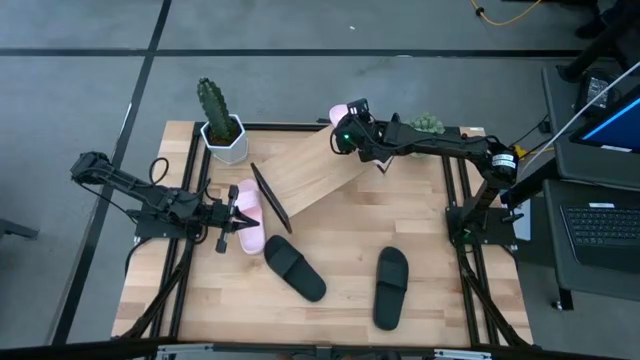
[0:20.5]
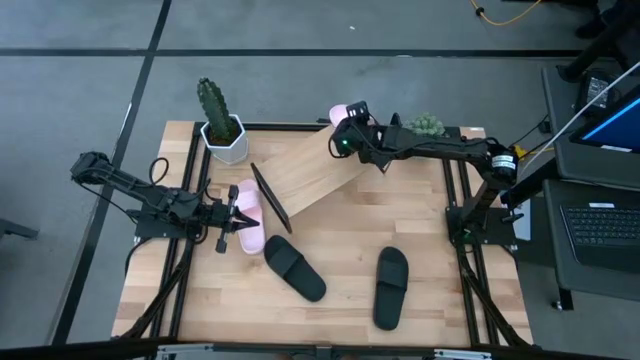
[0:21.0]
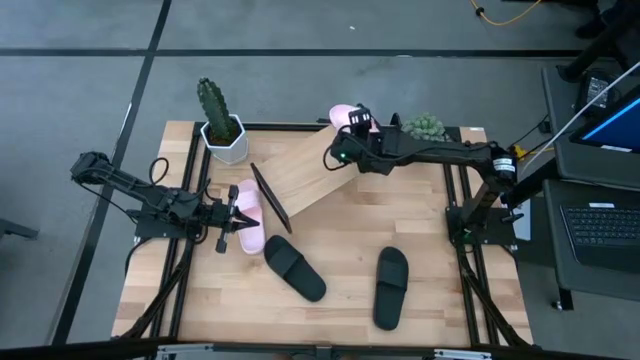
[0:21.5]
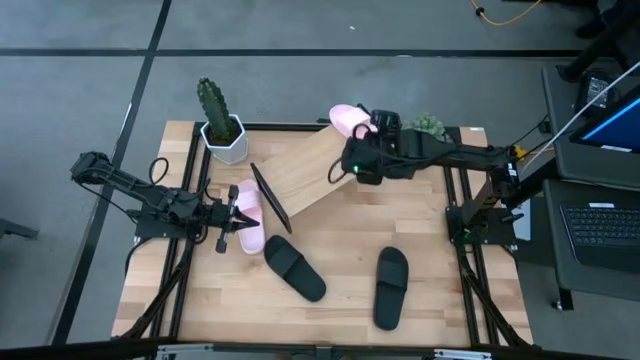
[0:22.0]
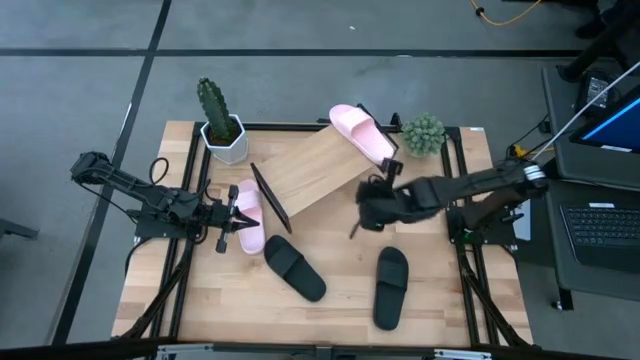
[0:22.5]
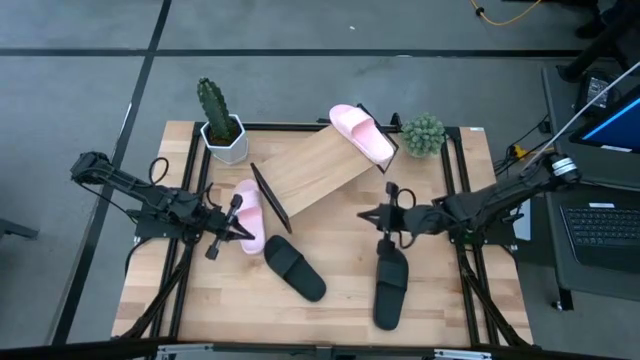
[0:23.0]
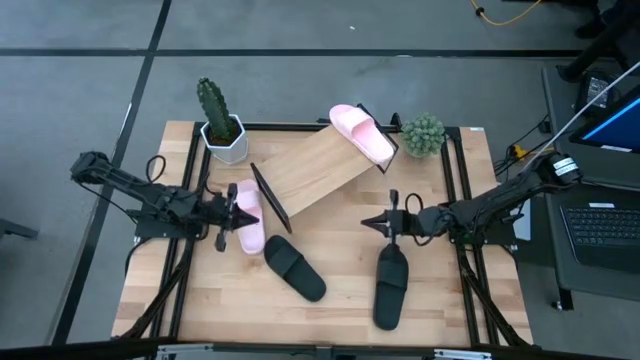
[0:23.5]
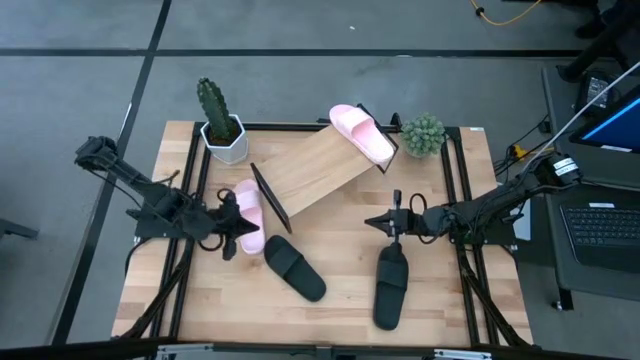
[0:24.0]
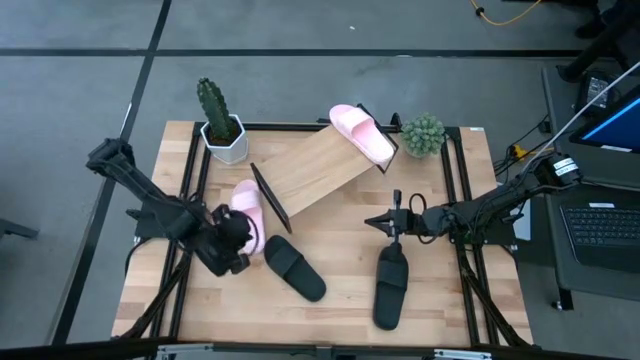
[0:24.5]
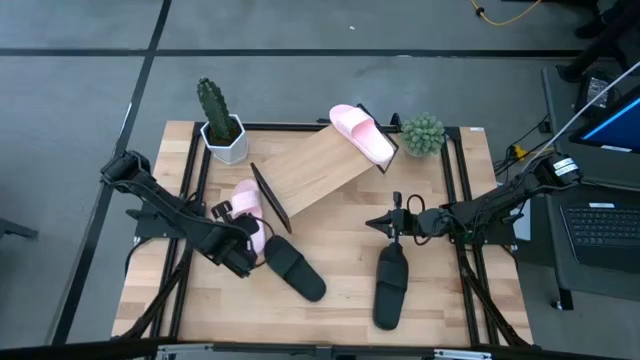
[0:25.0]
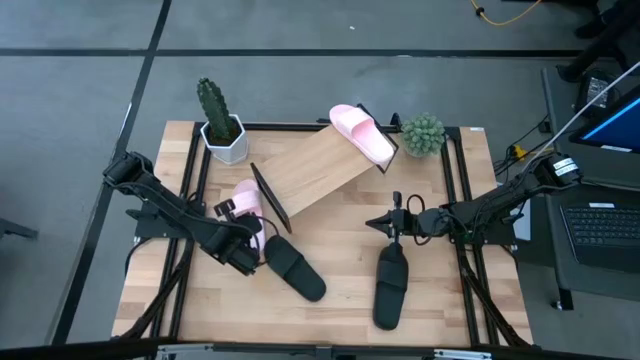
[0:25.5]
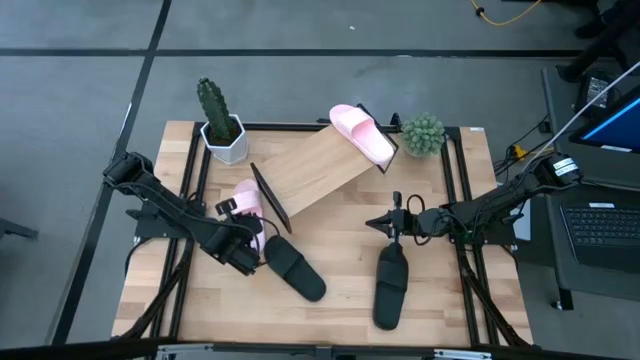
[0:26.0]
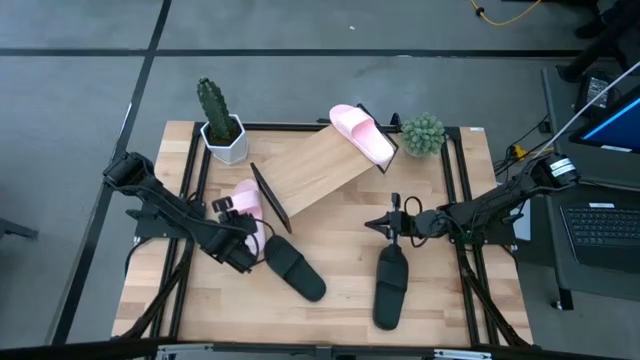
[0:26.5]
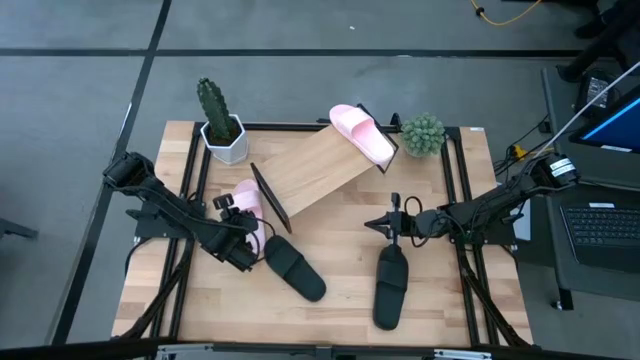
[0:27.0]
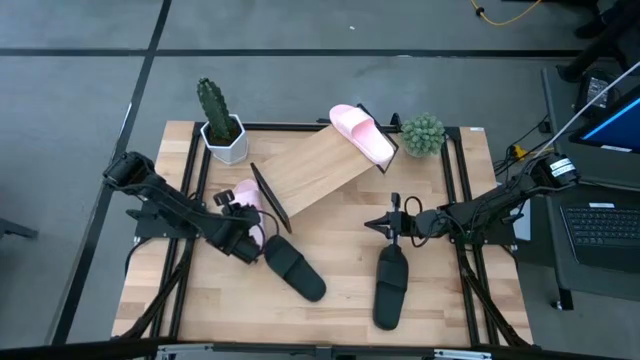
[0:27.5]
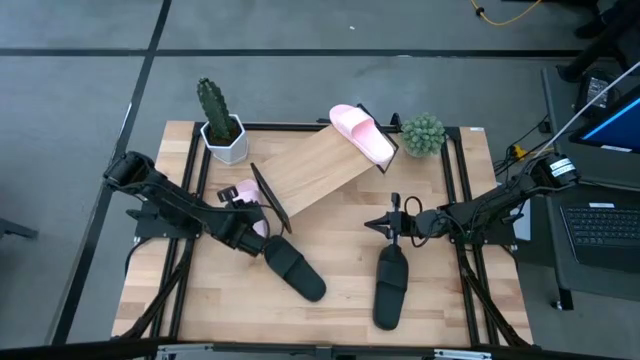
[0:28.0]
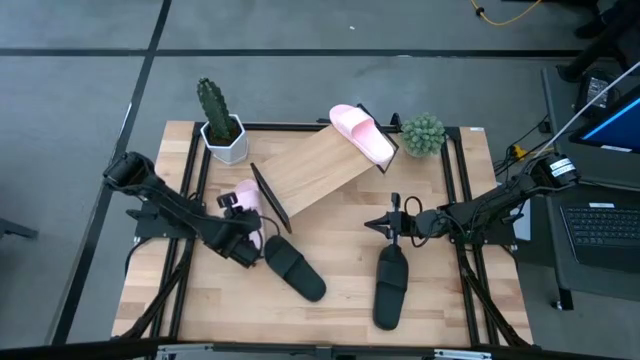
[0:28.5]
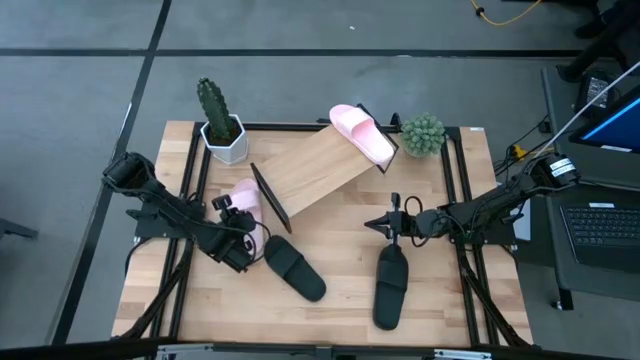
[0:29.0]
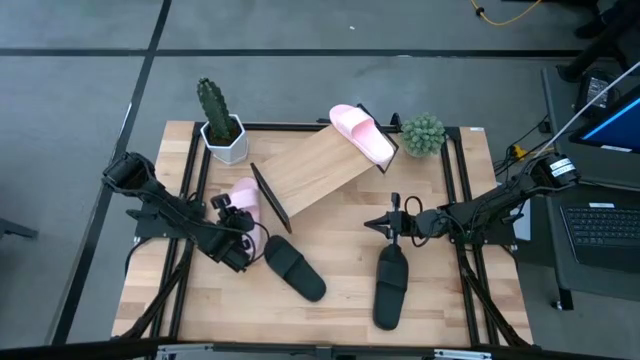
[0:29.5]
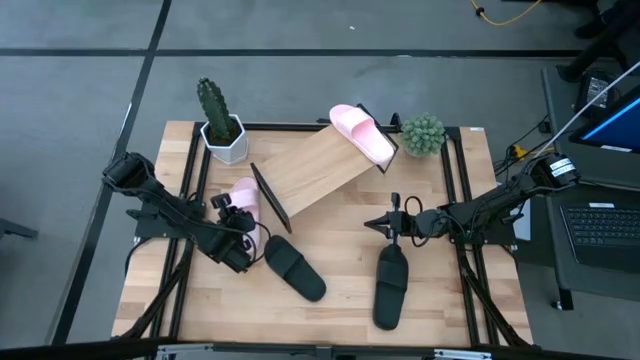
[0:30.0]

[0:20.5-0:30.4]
Task: Pick and place slides into the shelf
Put the pink slides on the shelf

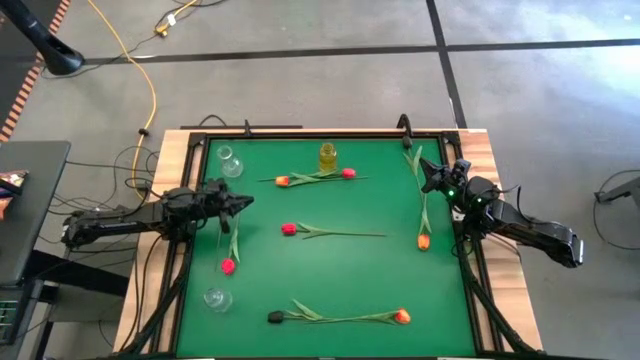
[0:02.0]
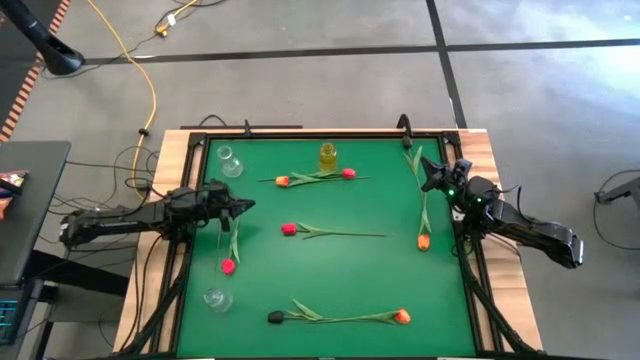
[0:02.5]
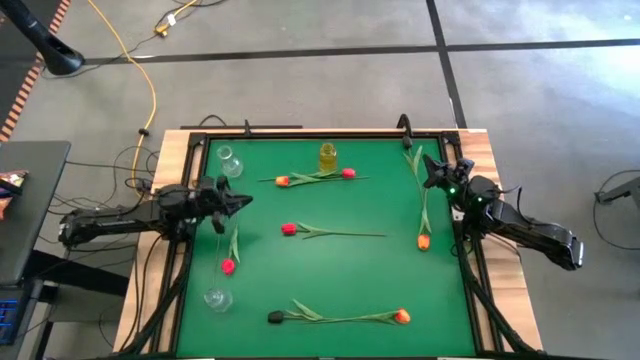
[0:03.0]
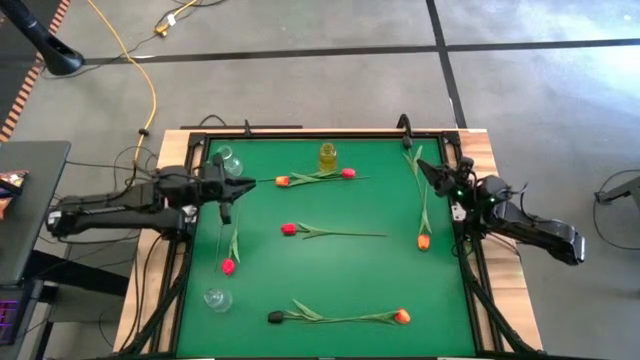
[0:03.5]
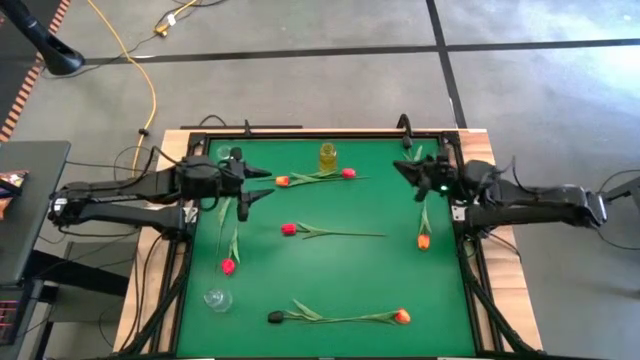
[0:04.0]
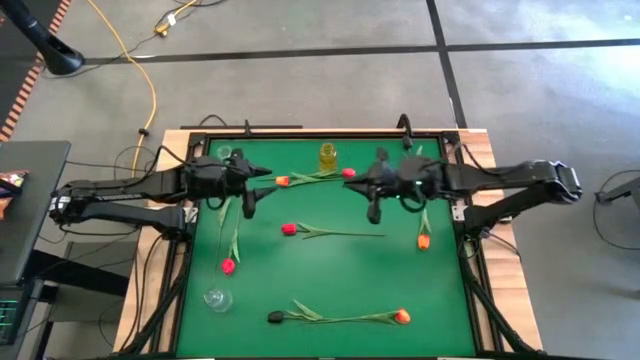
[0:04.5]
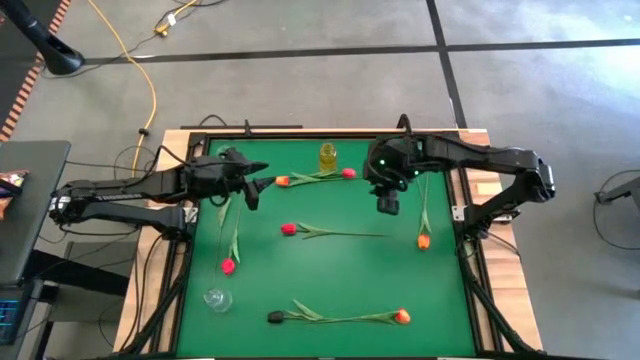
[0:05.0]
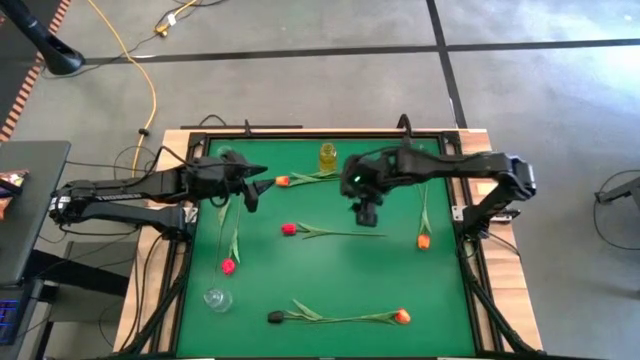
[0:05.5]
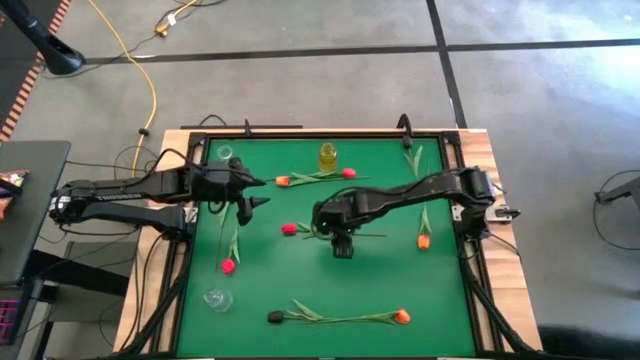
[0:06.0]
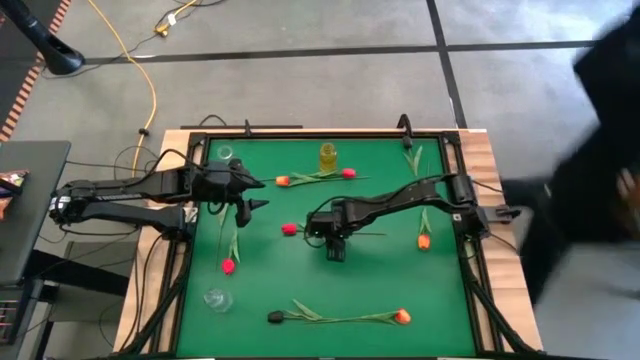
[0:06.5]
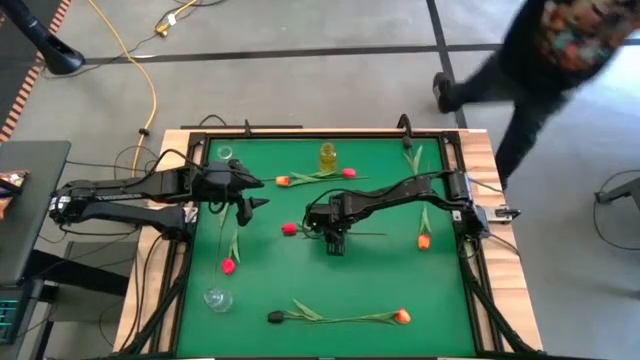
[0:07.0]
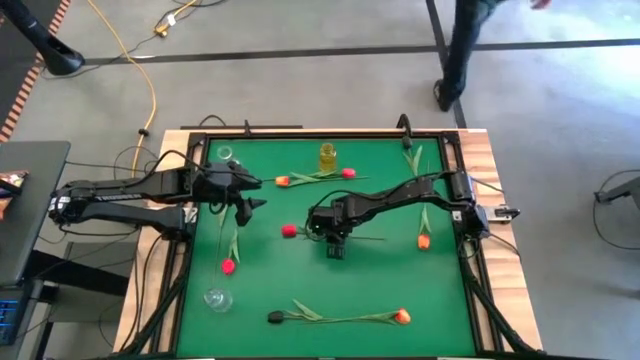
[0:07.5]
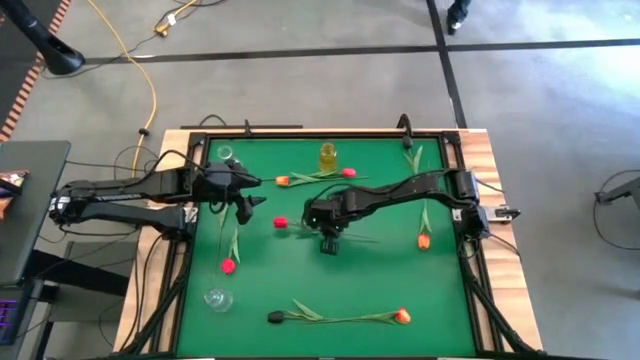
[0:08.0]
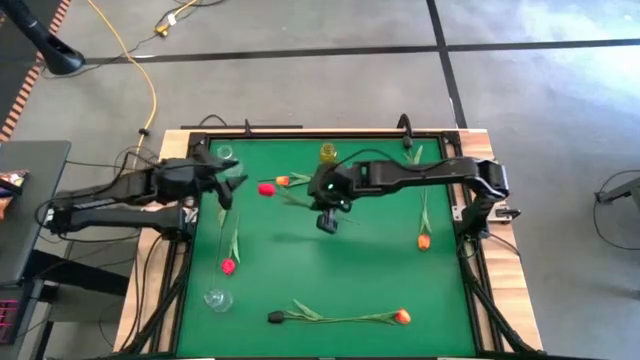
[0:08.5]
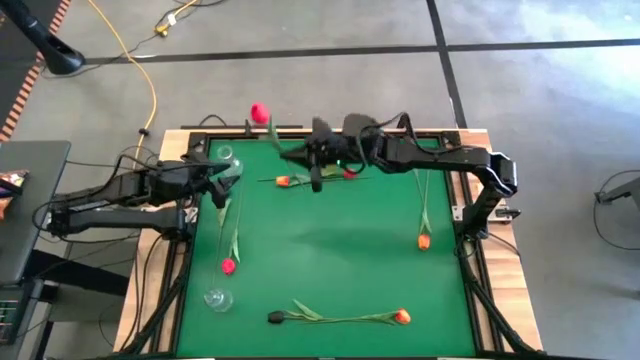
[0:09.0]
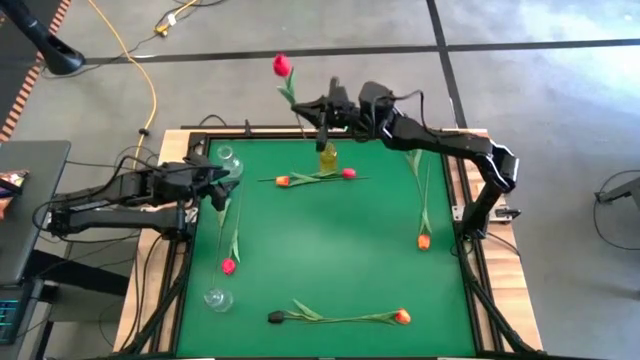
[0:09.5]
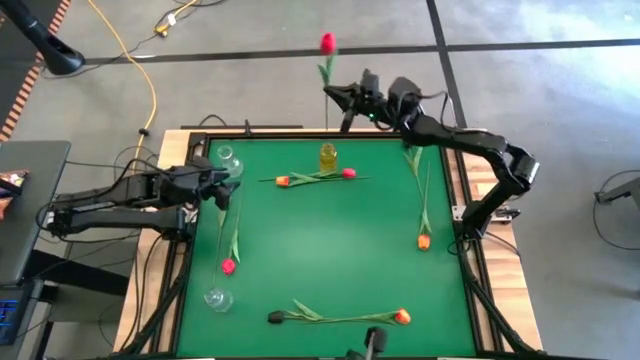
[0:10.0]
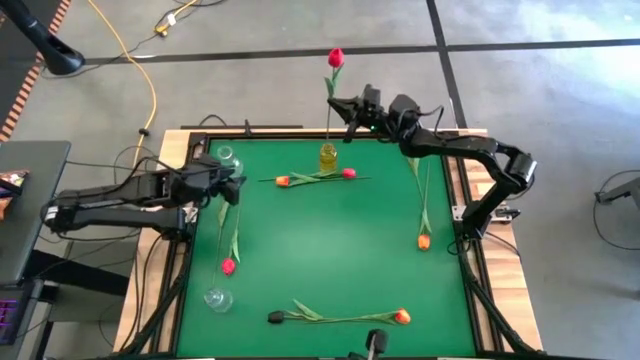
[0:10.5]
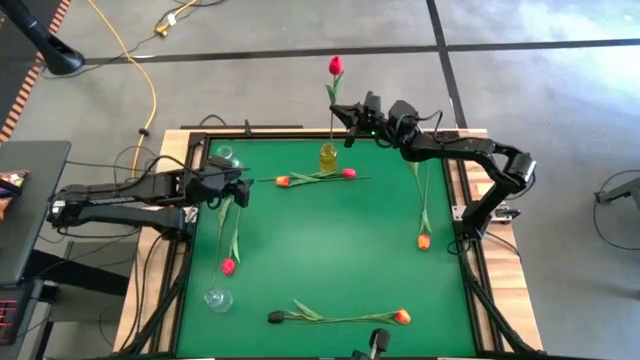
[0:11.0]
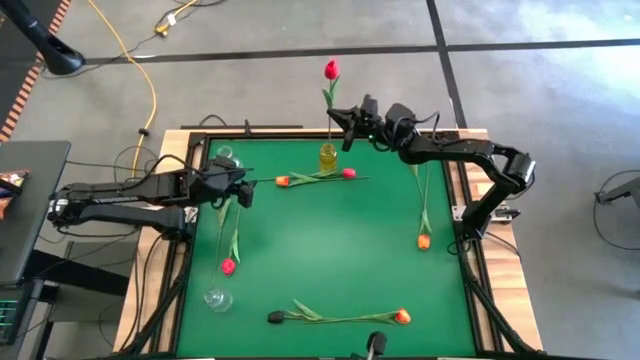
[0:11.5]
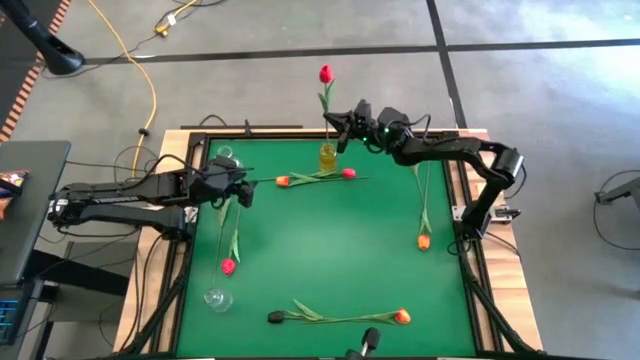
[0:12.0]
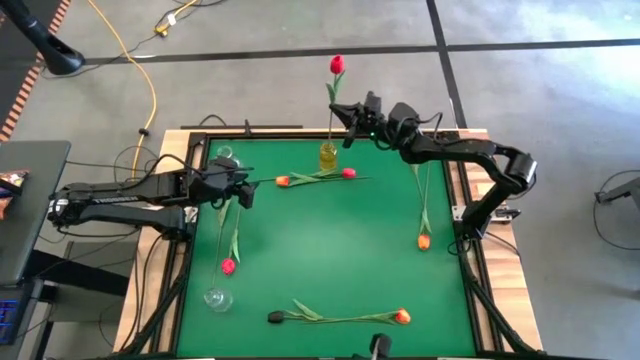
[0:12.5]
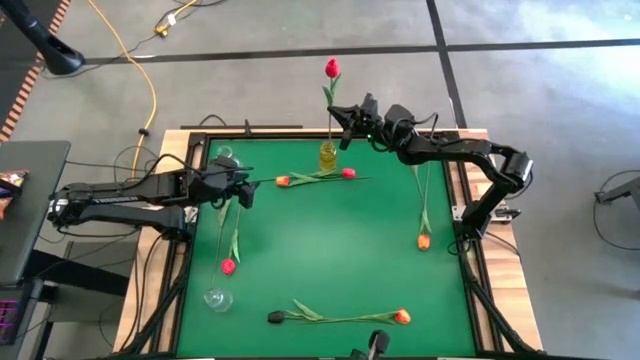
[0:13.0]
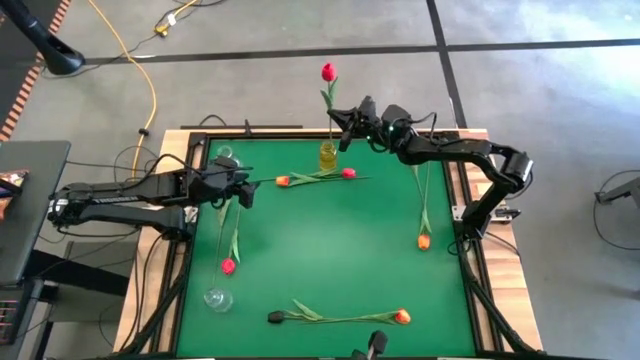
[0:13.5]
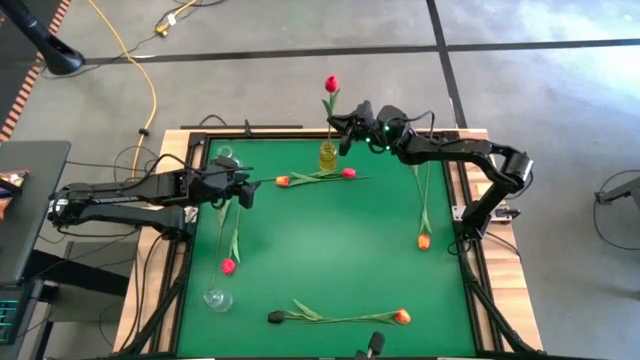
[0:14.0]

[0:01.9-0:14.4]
Task: Sort flowers into vase by color
Put the bottom right red flower into the yellow vase
